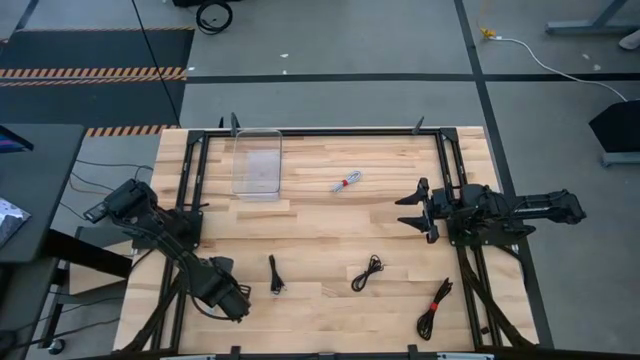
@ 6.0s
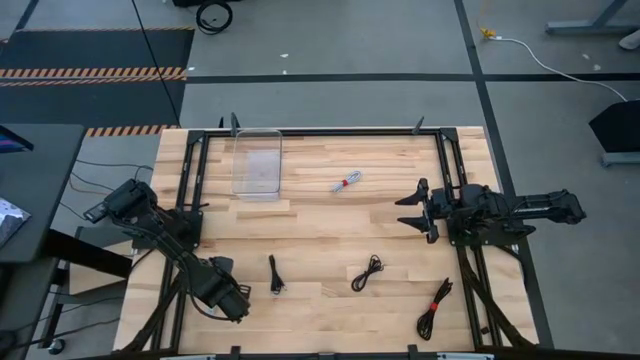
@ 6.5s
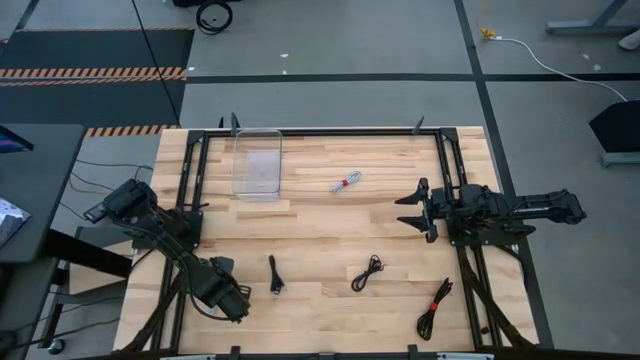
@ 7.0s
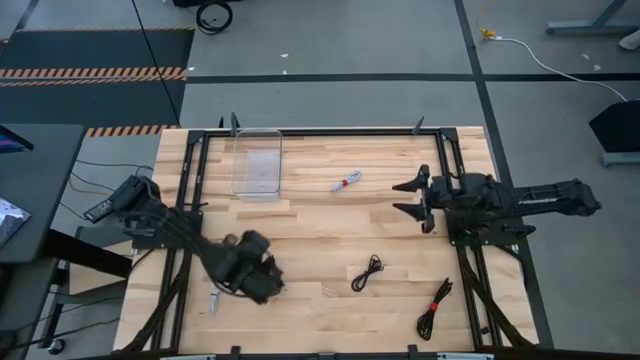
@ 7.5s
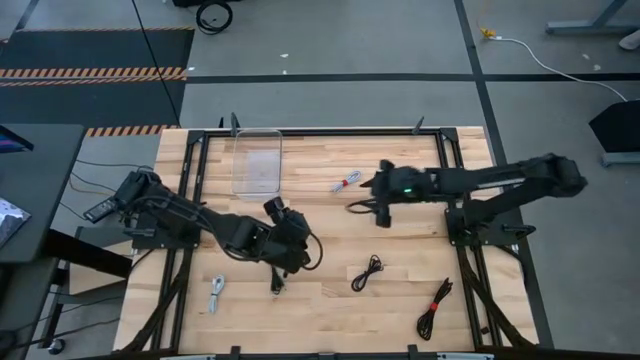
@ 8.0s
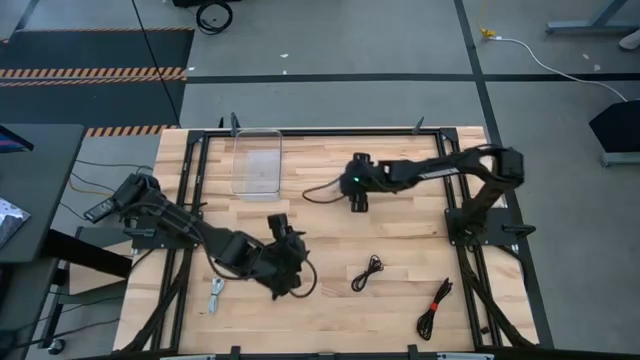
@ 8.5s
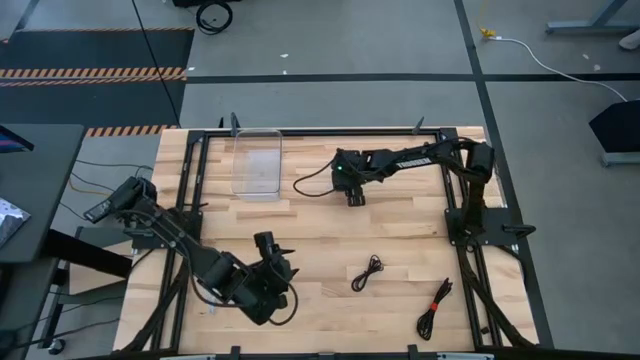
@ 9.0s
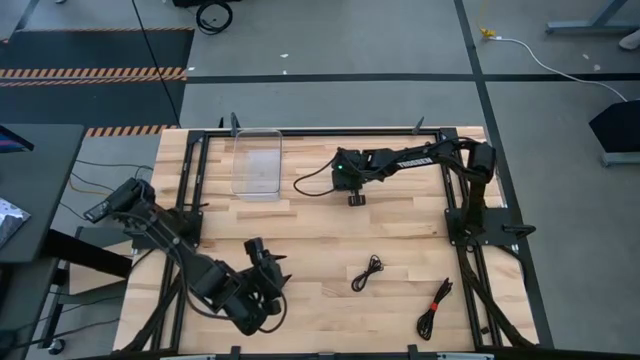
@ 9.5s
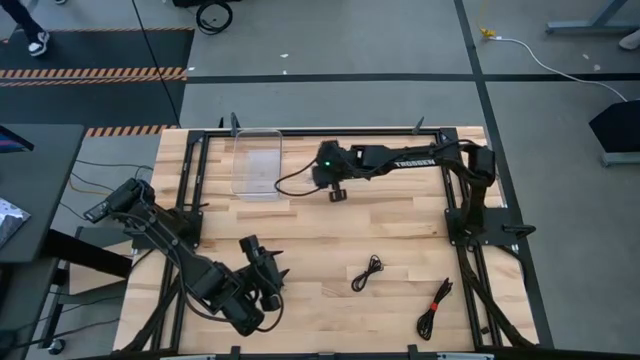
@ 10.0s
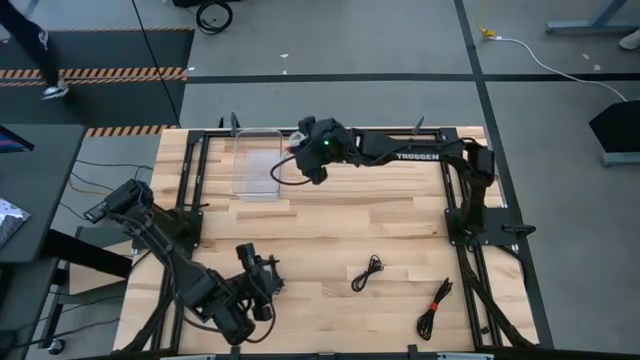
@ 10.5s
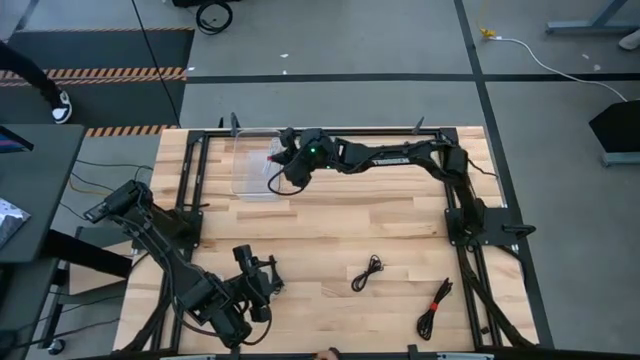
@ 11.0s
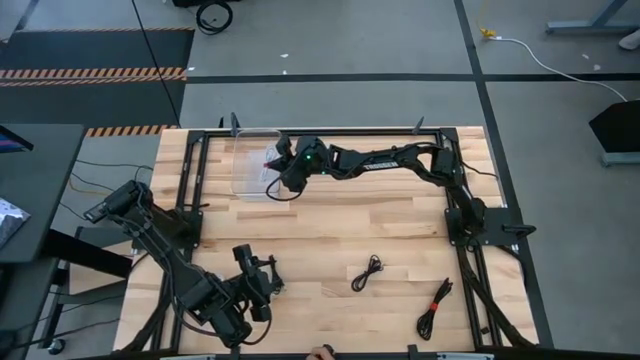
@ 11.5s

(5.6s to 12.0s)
Task: Pick and place USB-C Cables
Put the top white charger cable into the transparent bin

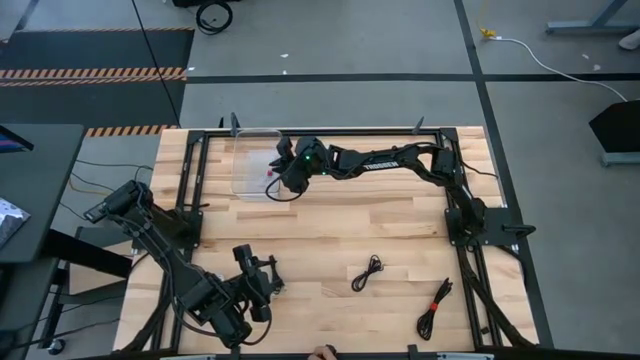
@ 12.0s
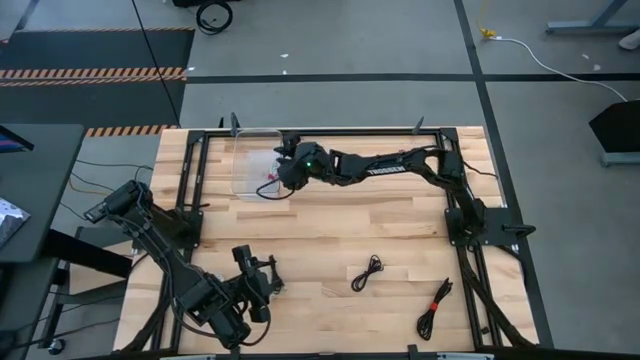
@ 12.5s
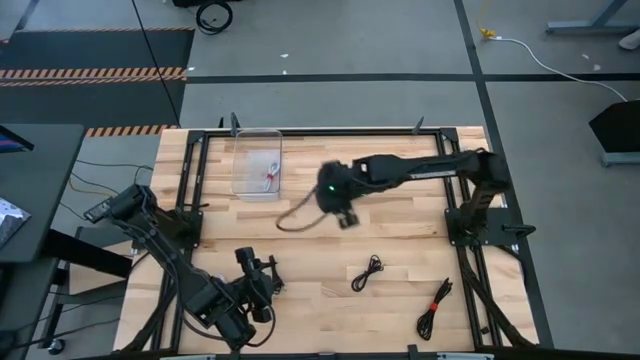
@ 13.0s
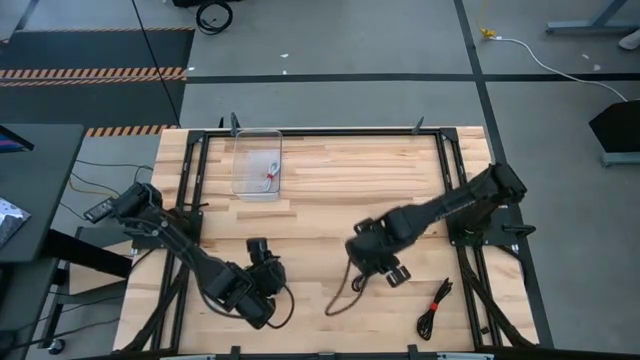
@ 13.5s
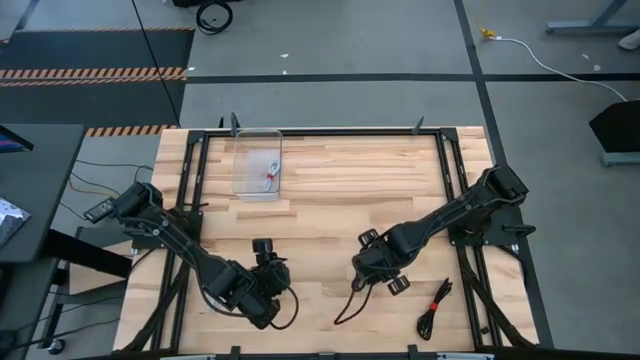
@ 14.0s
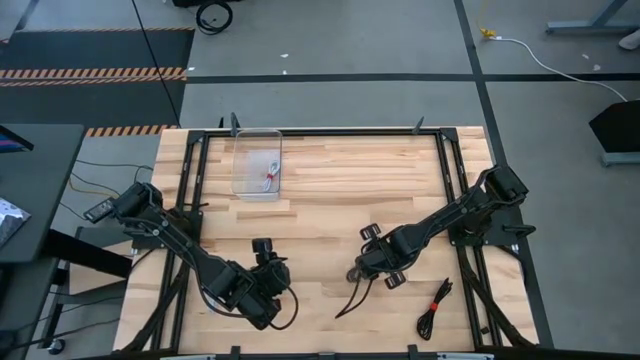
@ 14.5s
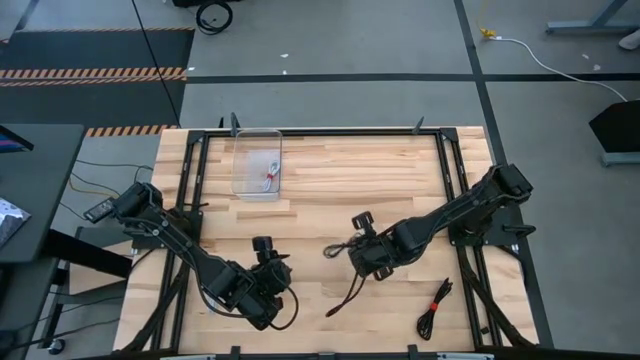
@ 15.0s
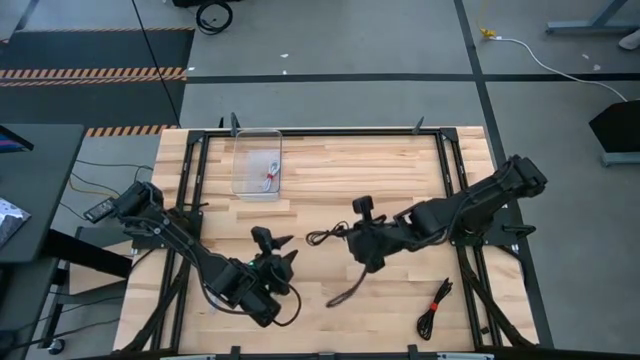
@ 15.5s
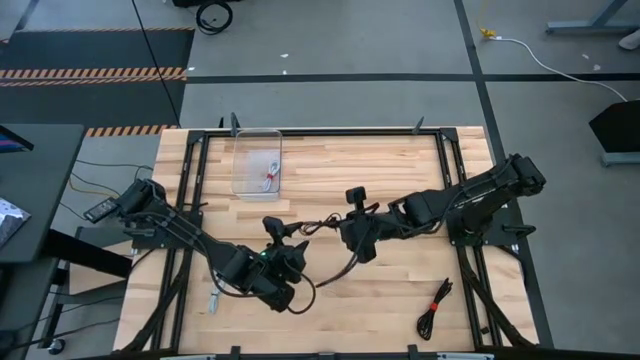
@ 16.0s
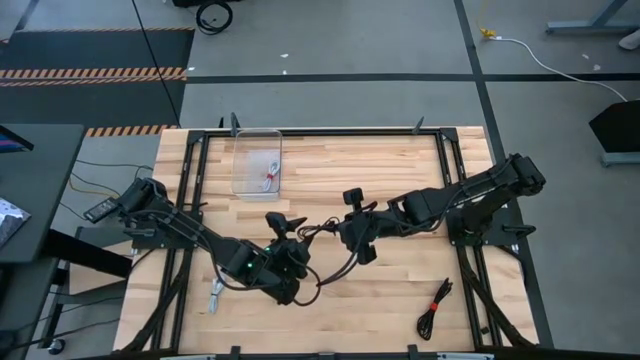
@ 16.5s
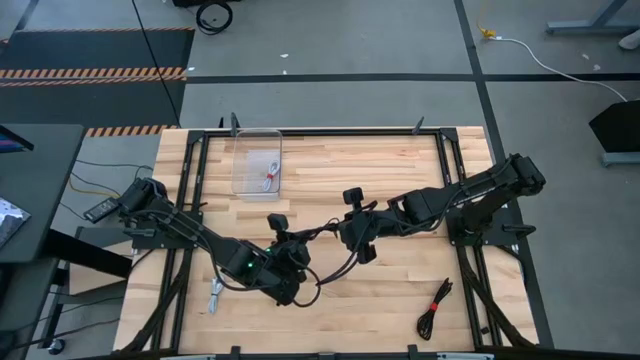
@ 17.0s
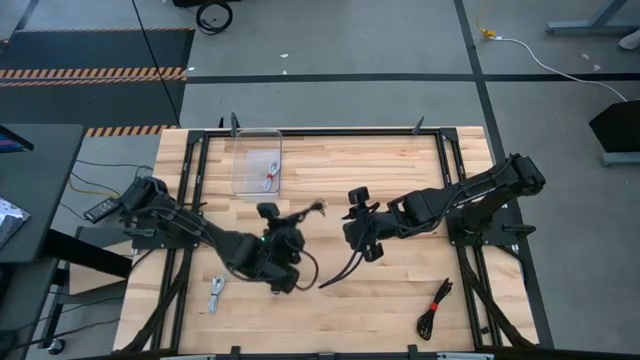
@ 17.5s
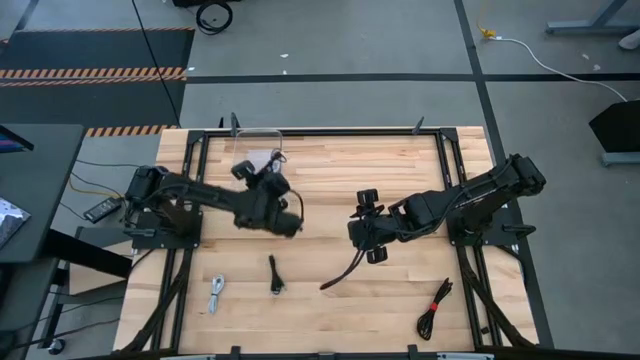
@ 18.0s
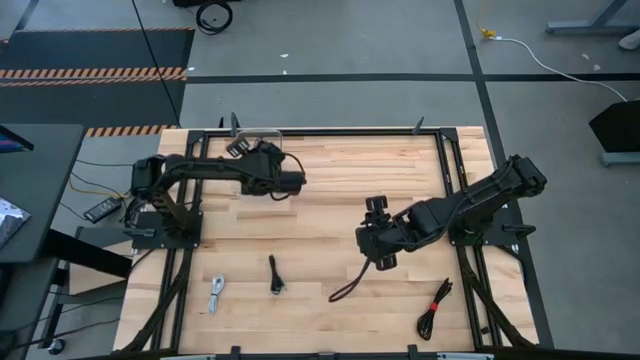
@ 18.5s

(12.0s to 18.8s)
Put the top right black charger cable into the transparent bin

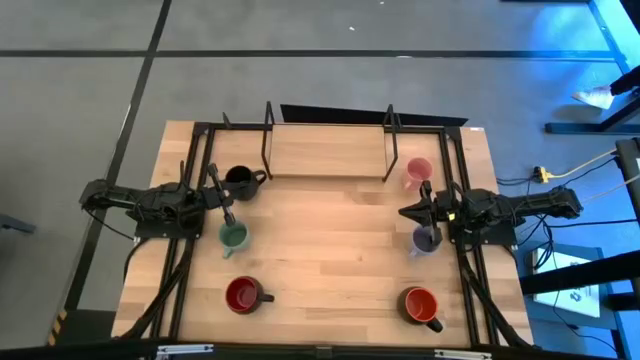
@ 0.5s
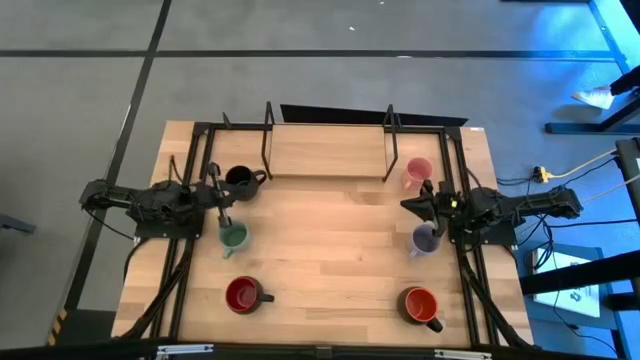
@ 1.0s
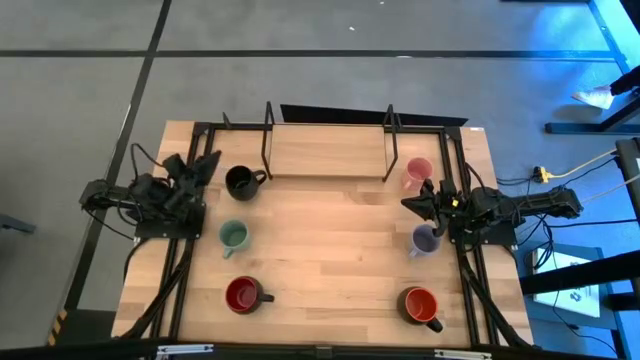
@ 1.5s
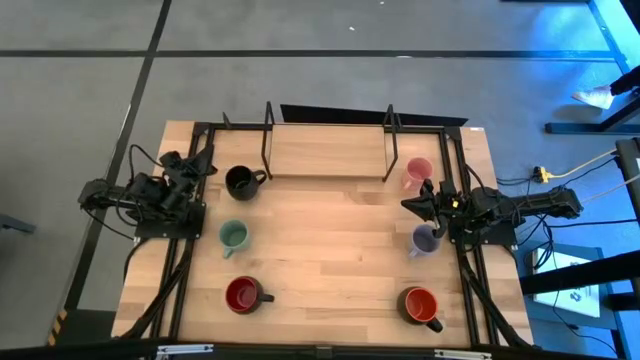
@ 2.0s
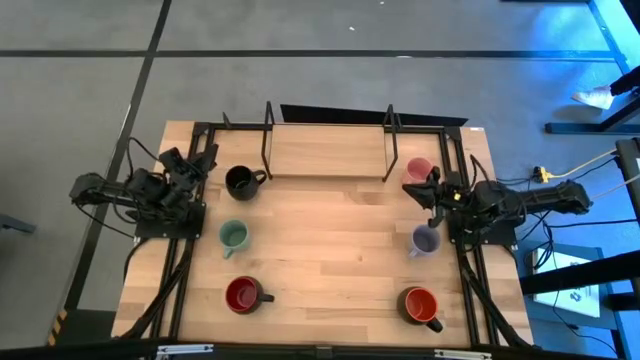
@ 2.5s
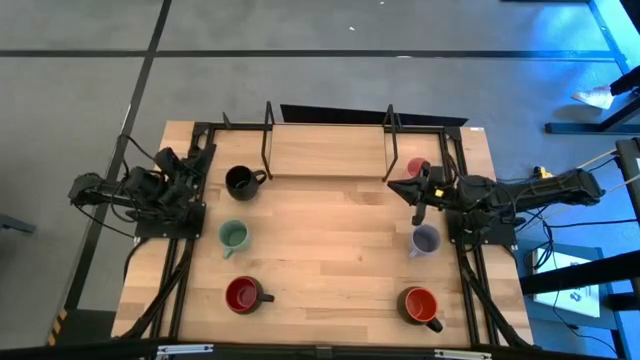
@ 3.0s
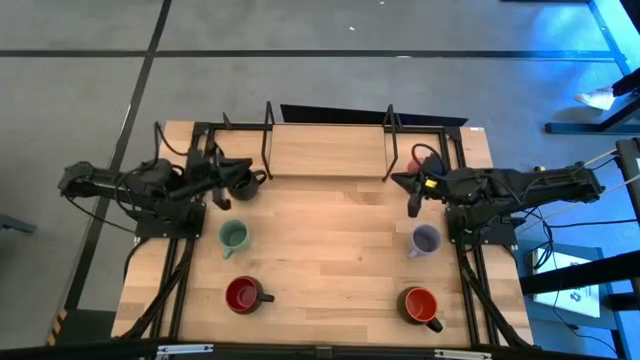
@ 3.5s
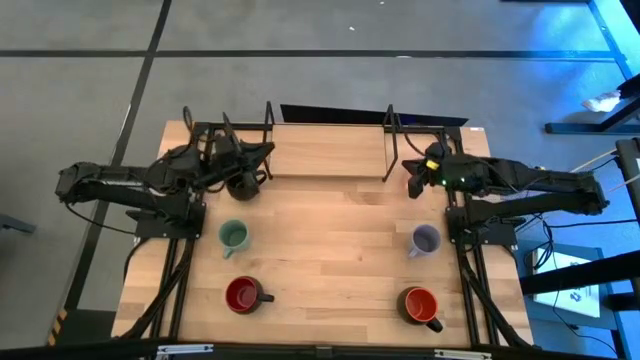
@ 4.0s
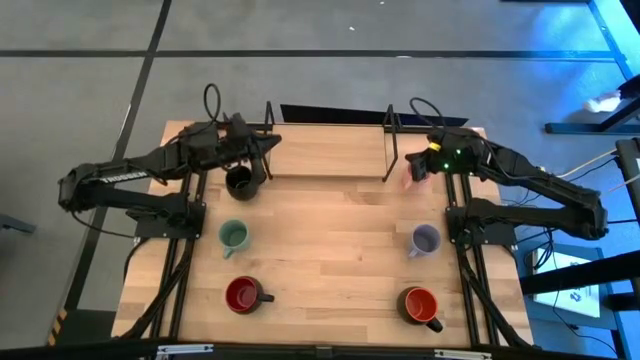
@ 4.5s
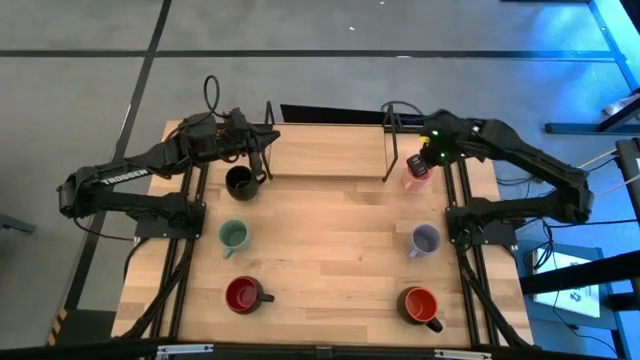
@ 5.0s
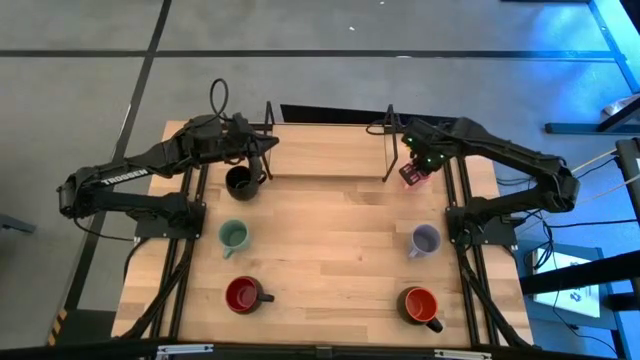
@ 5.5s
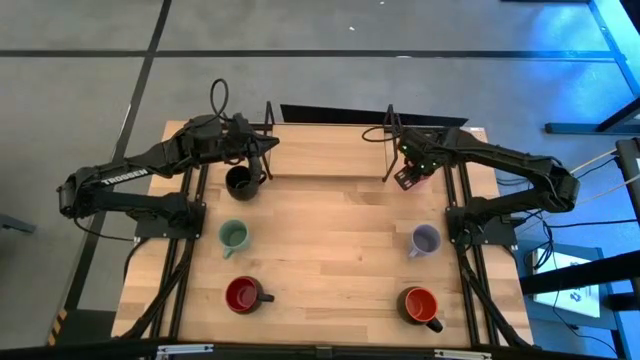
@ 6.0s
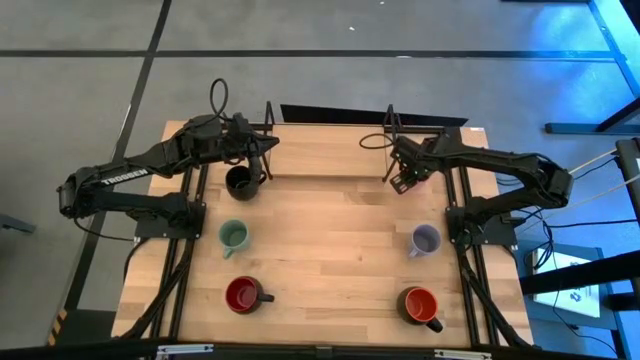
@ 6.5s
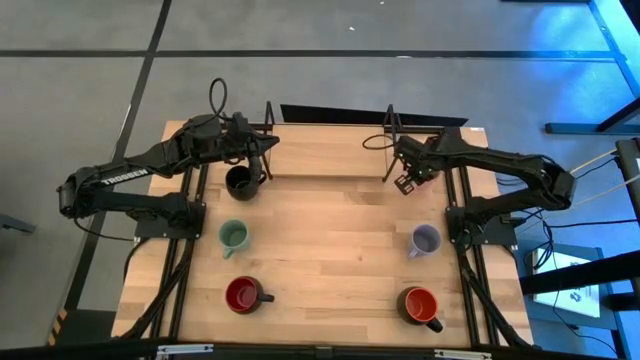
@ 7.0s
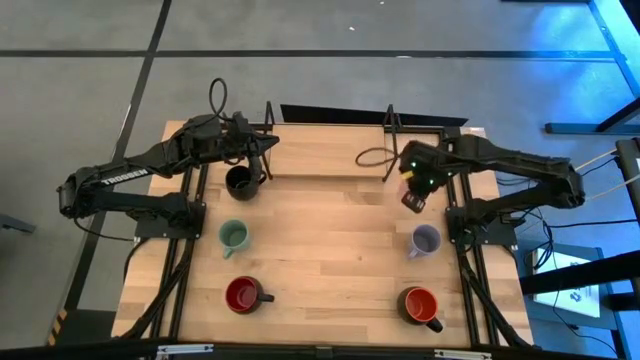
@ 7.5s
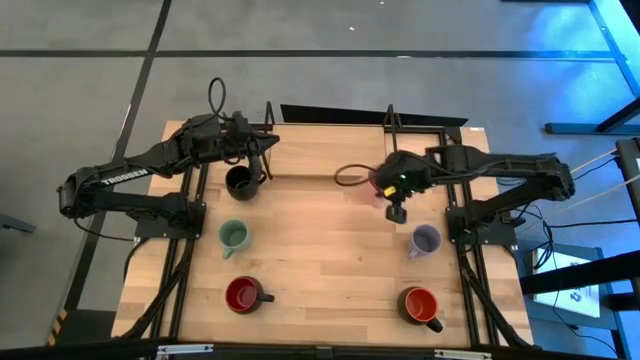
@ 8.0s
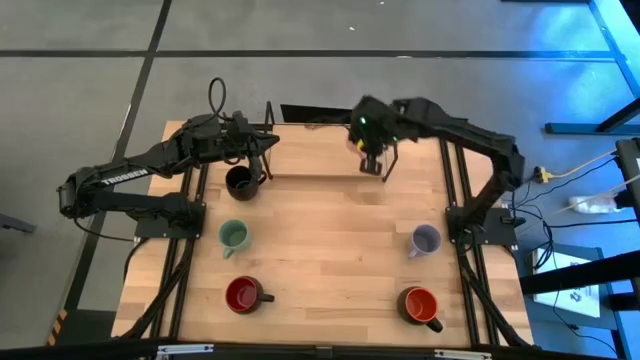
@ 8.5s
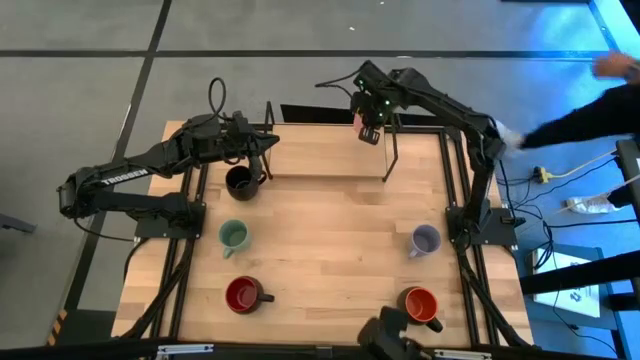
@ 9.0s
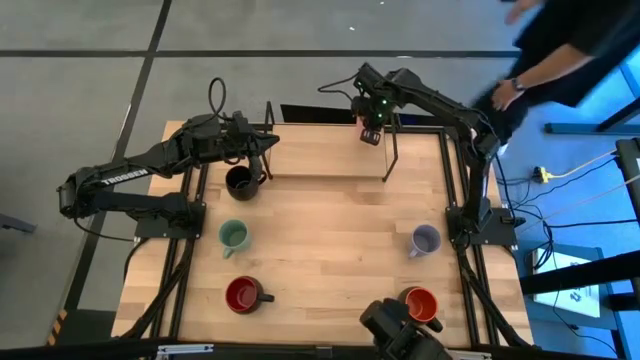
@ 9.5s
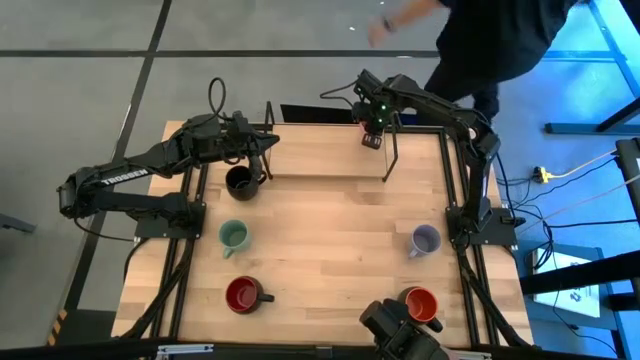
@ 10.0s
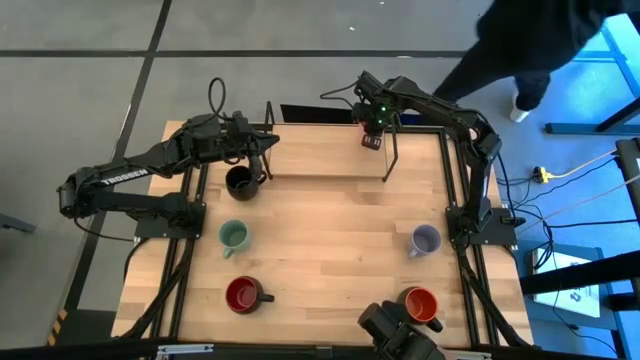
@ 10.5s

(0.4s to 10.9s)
Task: Place coffee mugs
Put the pink mug on the shelf
